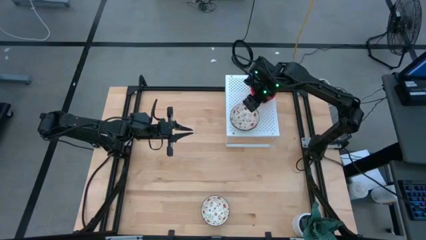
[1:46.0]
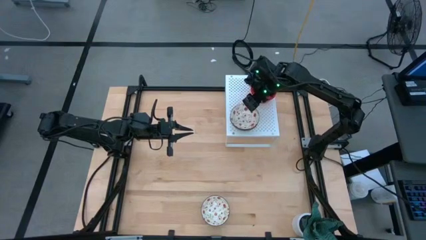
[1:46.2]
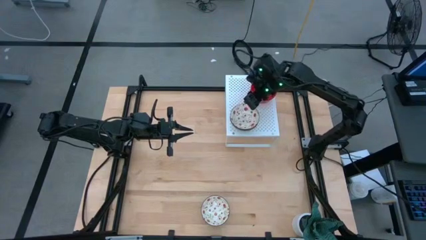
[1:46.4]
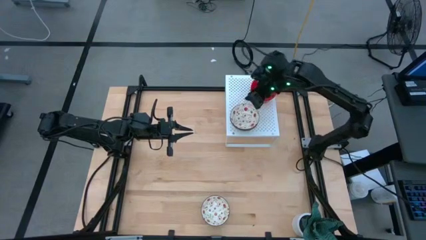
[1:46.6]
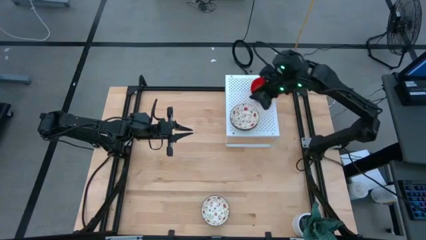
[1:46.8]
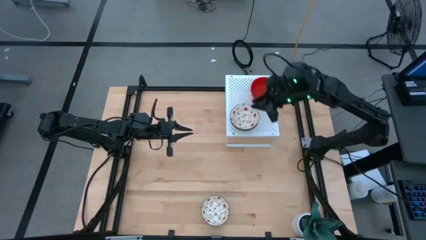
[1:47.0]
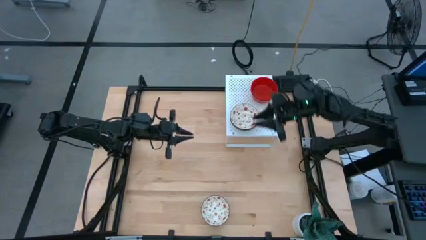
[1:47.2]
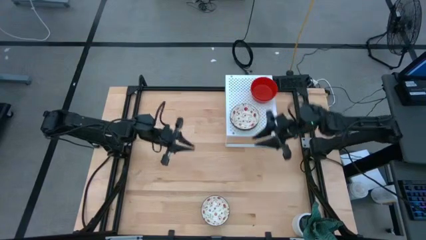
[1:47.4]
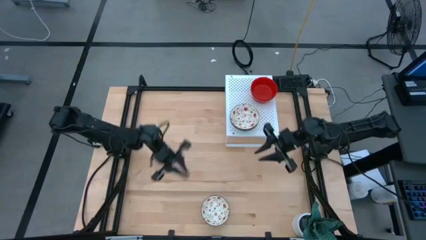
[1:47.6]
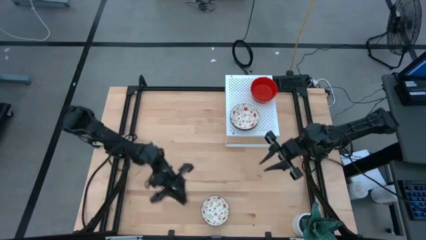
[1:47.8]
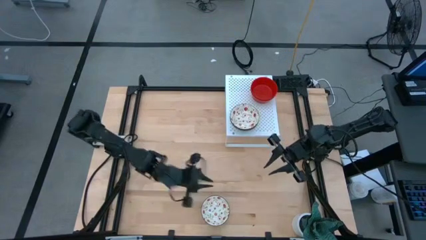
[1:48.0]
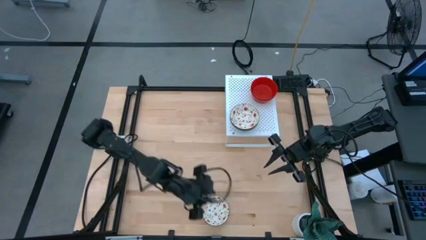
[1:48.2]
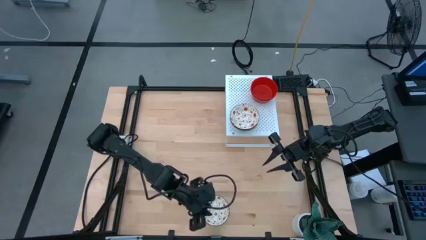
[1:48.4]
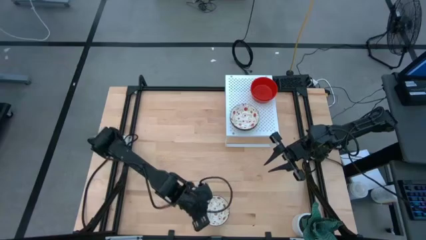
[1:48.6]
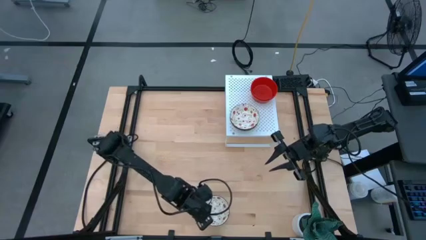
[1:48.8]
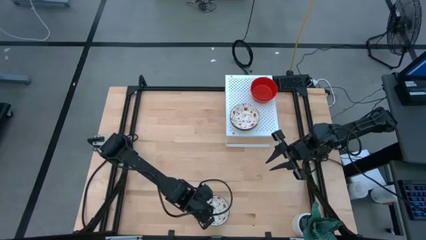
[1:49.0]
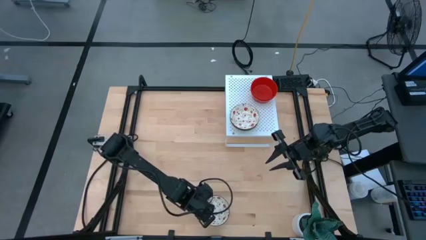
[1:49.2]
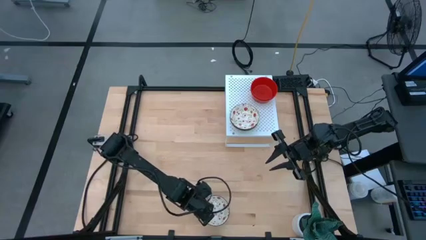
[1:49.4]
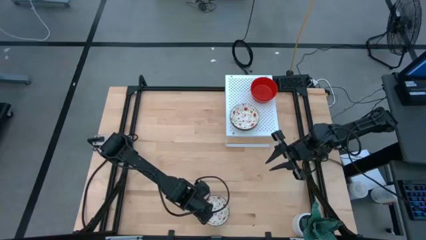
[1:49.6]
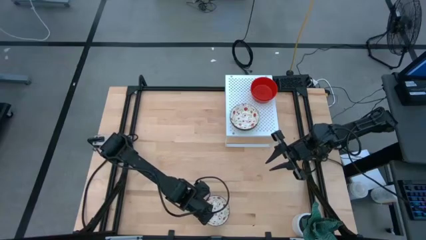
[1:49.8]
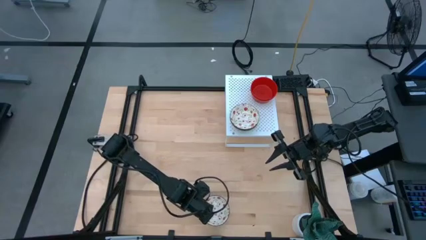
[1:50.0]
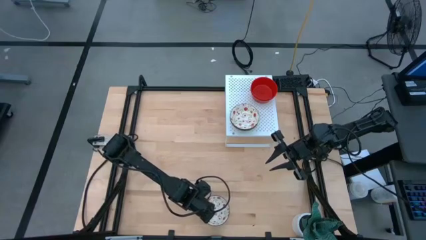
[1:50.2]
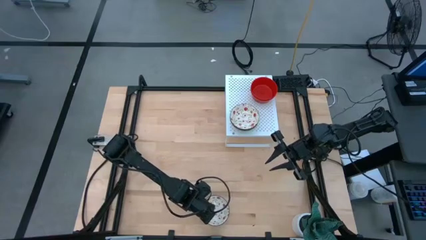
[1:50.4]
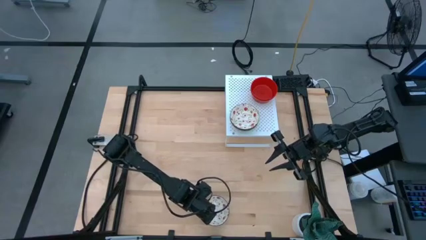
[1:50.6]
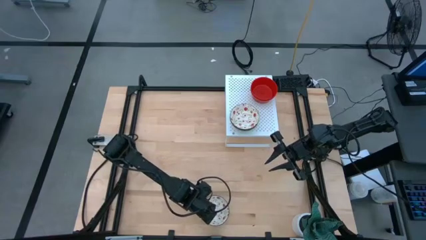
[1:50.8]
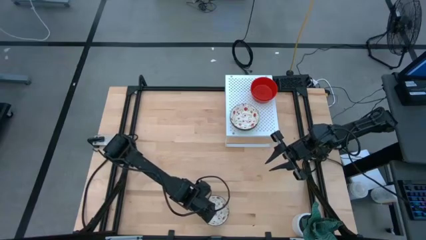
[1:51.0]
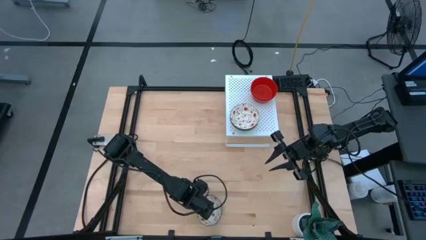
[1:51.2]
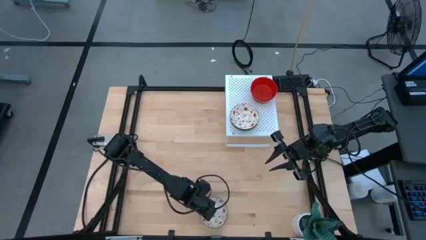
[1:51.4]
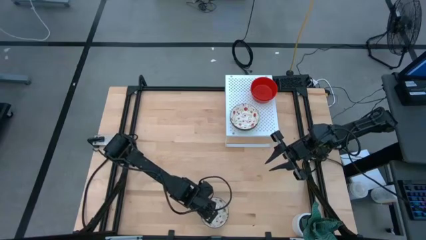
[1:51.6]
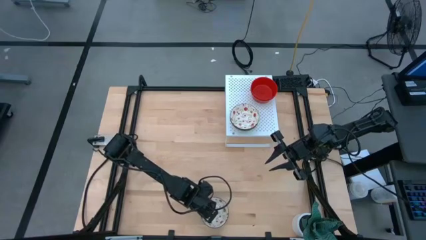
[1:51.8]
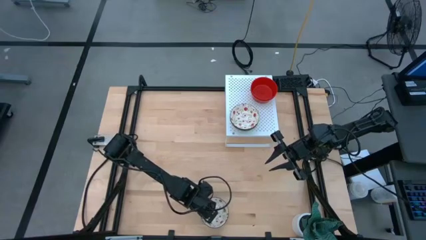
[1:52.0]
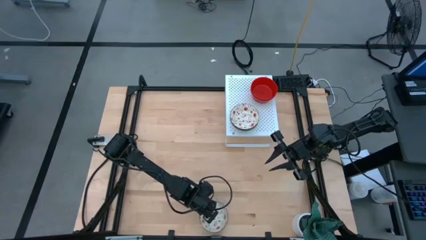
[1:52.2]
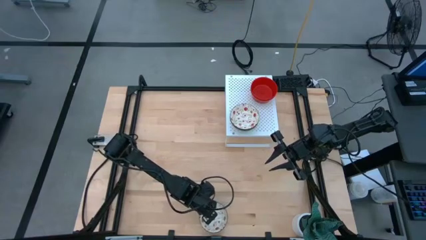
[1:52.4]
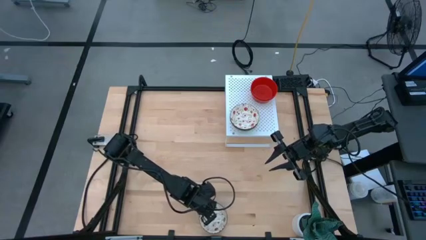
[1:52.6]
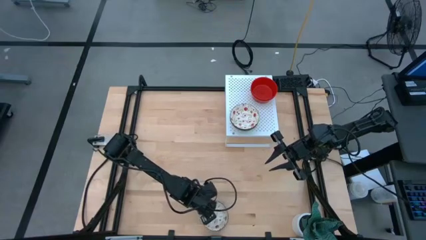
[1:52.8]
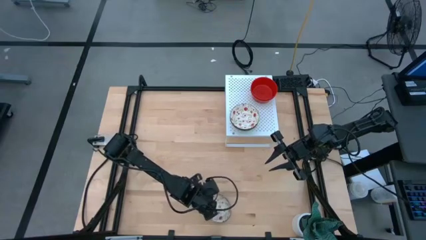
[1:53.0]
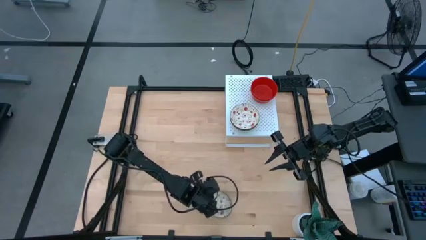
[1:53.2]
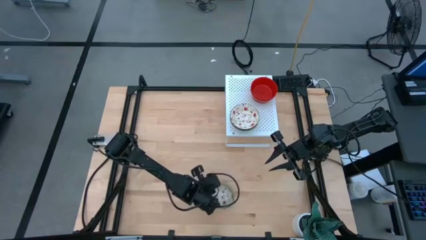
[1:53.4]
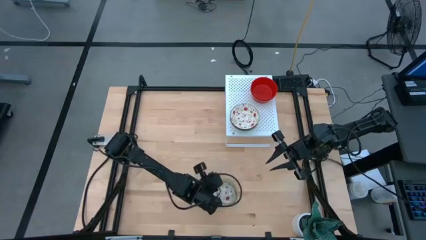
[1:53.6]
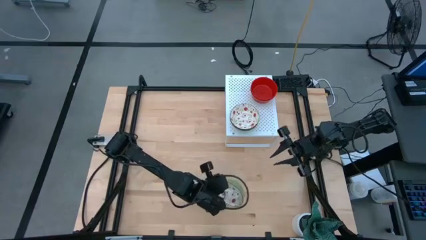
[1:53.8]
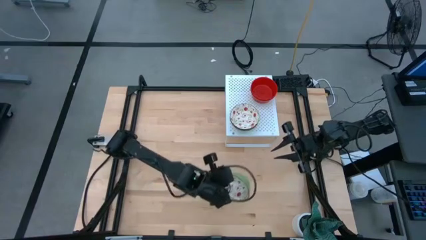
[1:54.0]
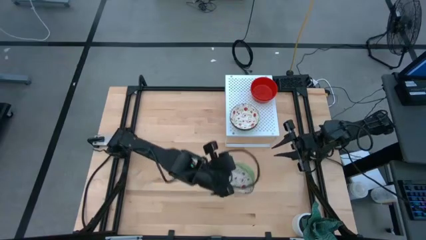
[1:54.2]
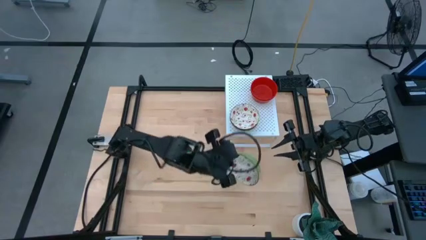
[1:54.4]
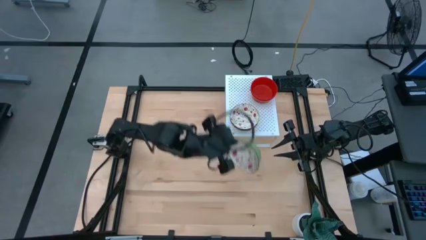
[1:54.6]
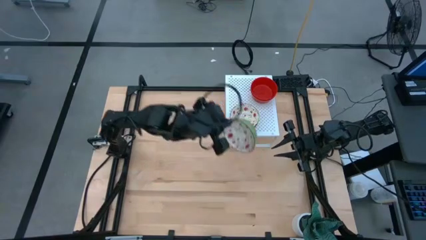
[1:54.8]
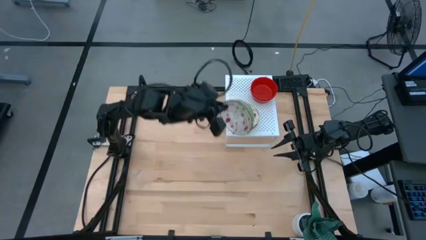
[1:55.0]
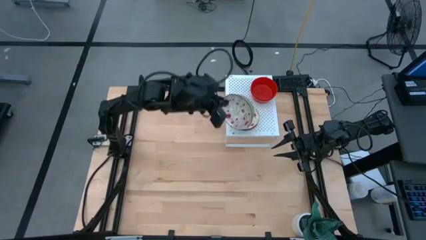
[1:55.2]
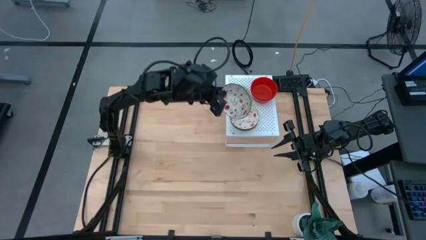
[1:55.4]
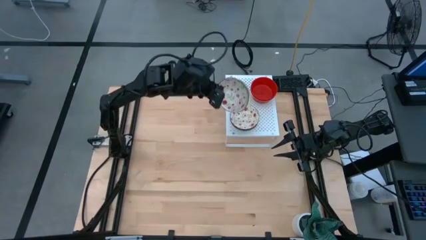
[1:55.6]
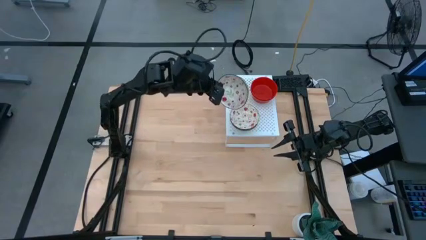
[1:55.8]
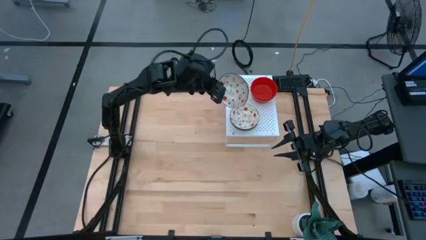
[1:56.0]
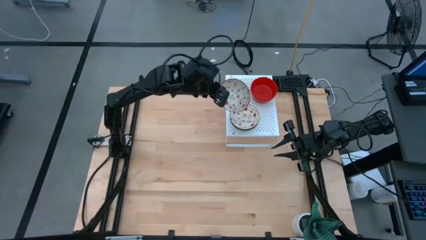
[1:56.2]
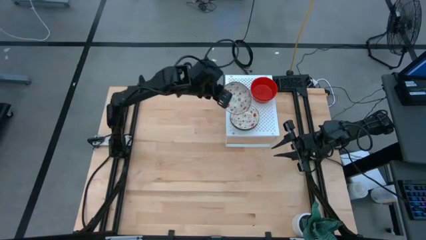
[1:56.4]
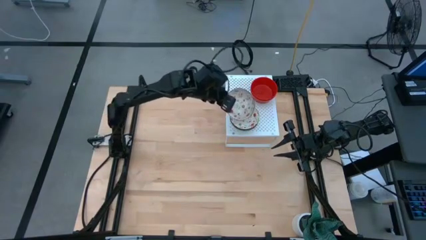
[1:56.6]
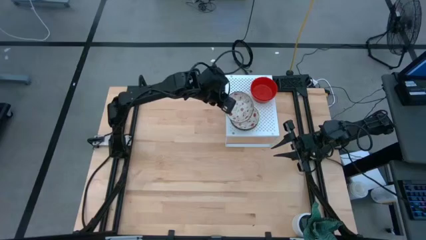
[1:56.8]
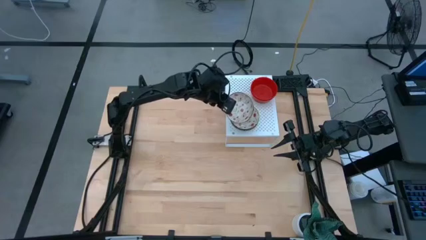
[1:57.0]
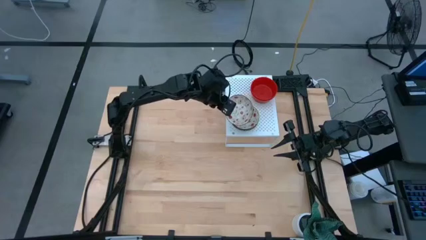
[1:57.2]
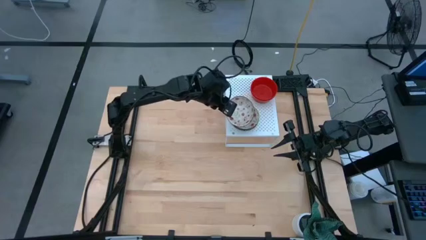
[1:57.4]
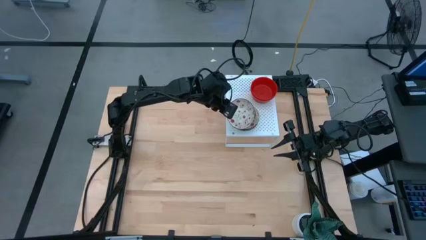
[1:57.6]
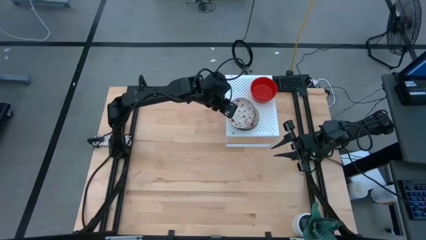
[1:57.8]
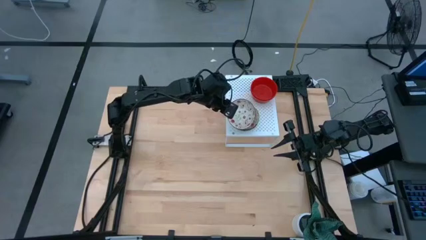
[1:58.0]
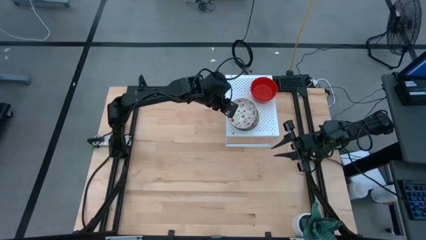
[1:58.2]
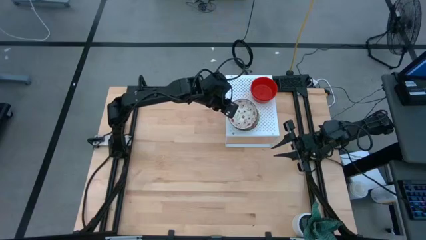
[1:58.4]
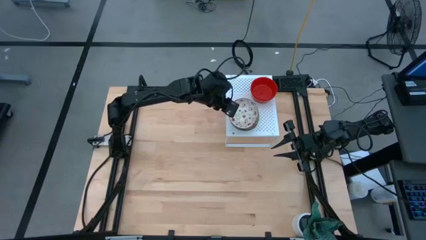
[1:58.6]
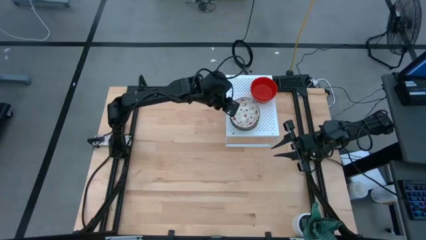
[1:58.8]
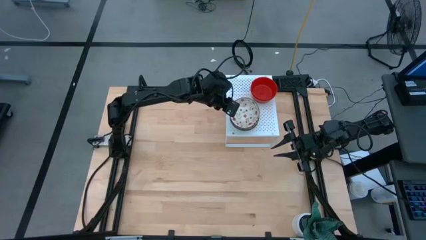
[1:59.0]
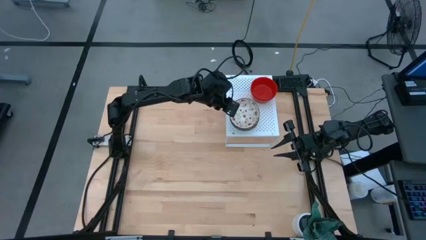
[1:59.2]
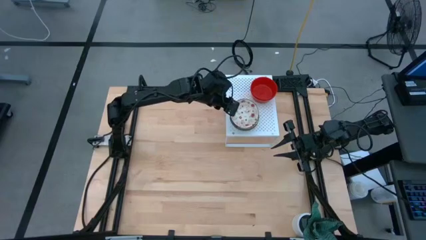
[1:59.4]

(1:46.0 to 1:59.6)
Task: Pick & Place Mini bowls
Stack the green bowl on the green bowl on the shelf
